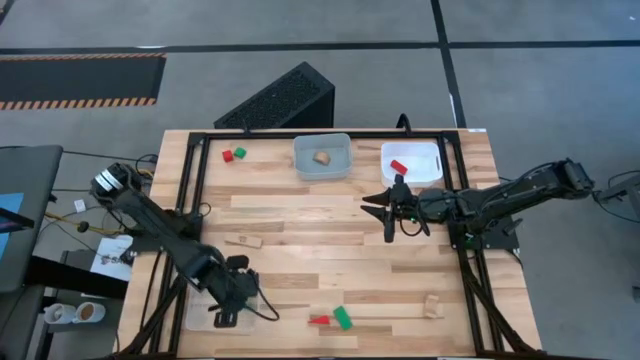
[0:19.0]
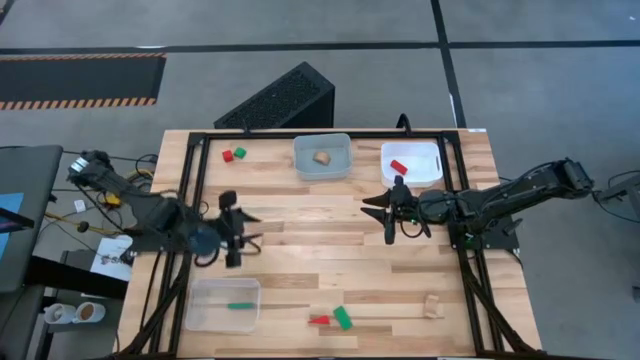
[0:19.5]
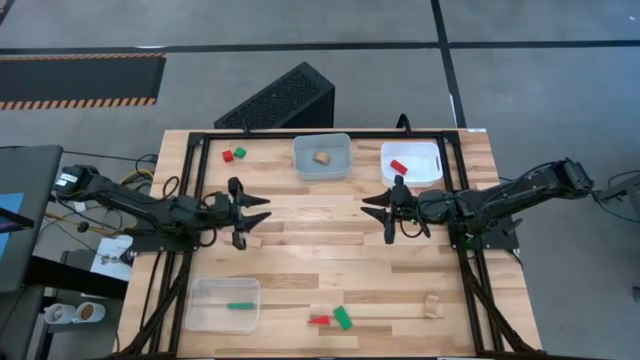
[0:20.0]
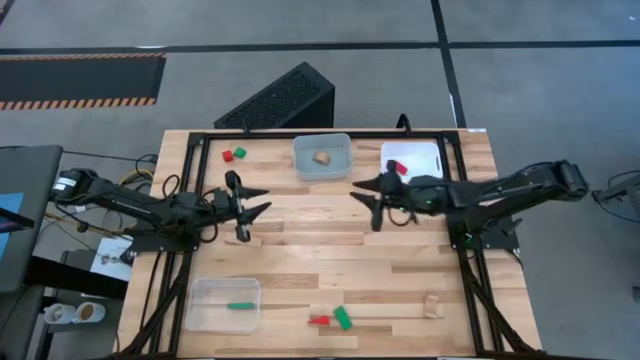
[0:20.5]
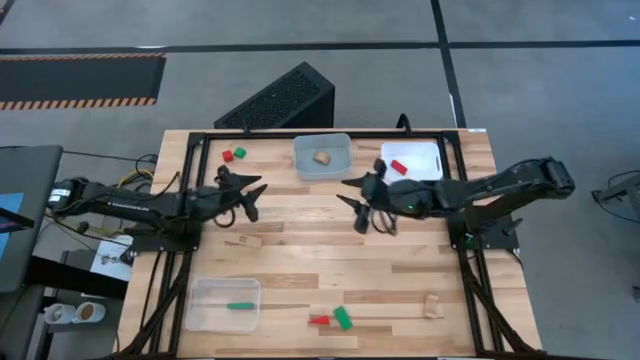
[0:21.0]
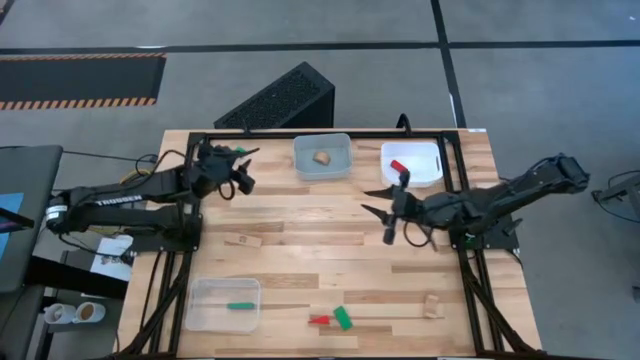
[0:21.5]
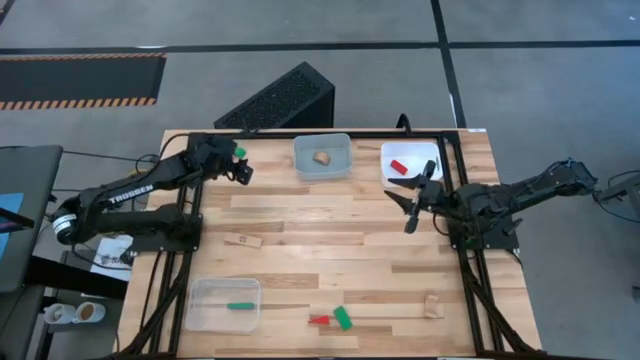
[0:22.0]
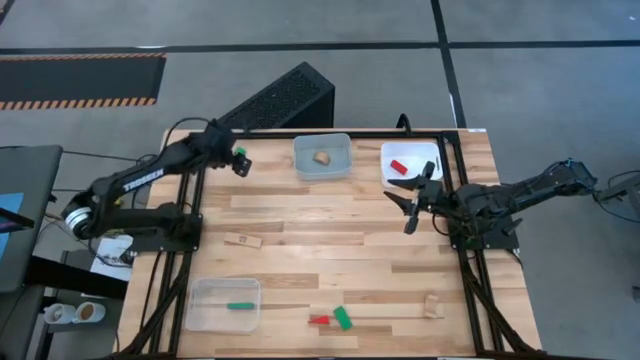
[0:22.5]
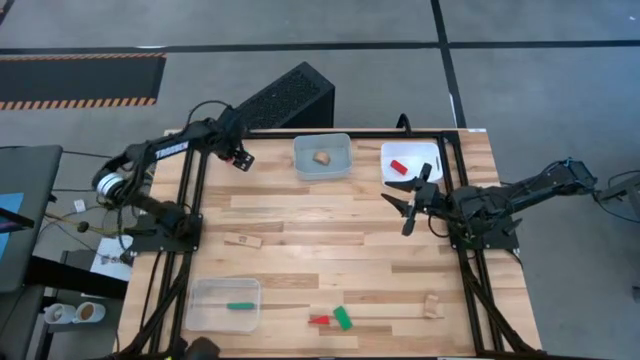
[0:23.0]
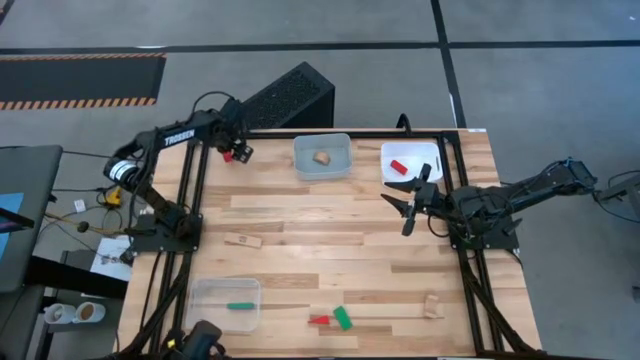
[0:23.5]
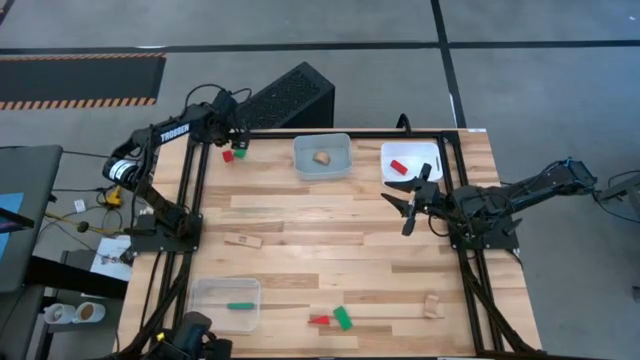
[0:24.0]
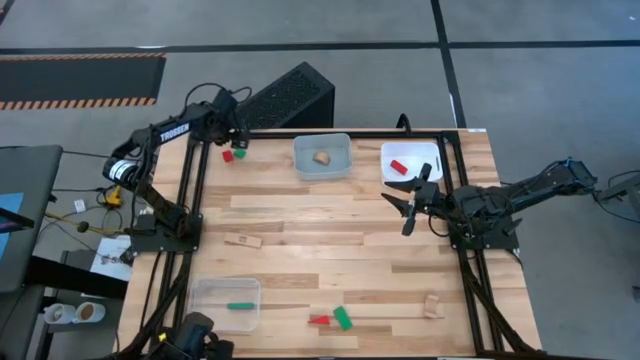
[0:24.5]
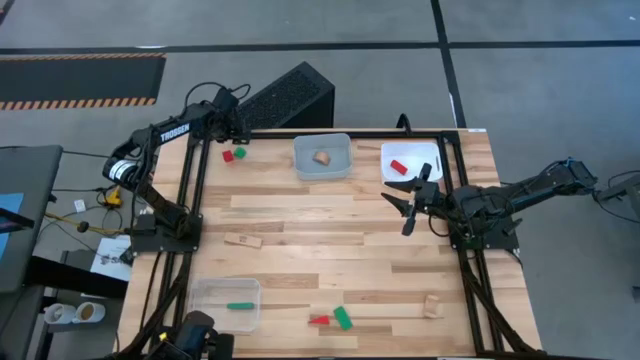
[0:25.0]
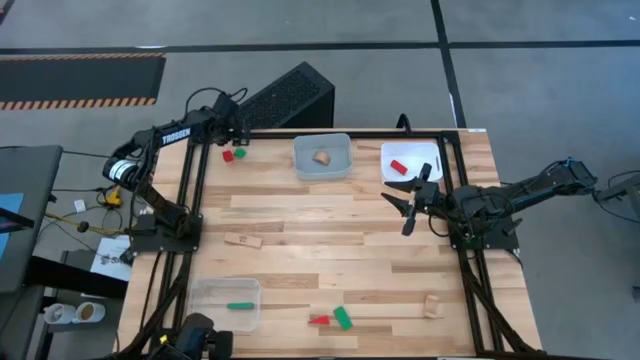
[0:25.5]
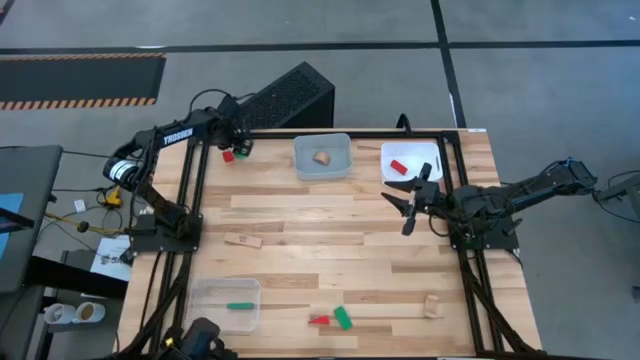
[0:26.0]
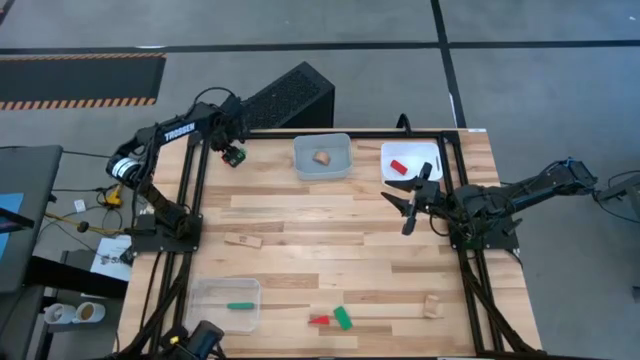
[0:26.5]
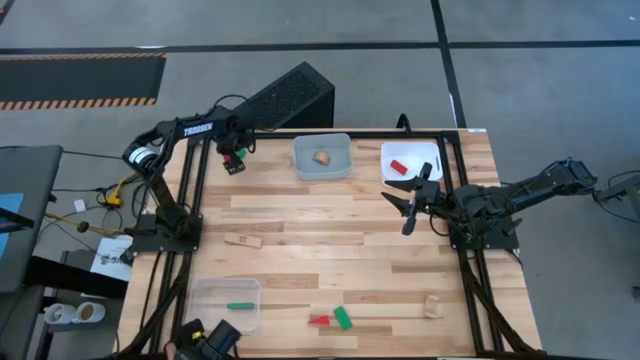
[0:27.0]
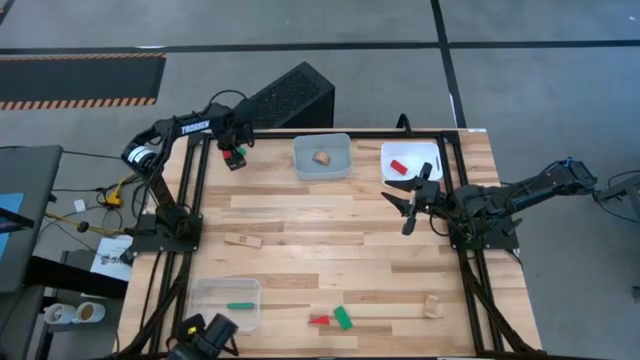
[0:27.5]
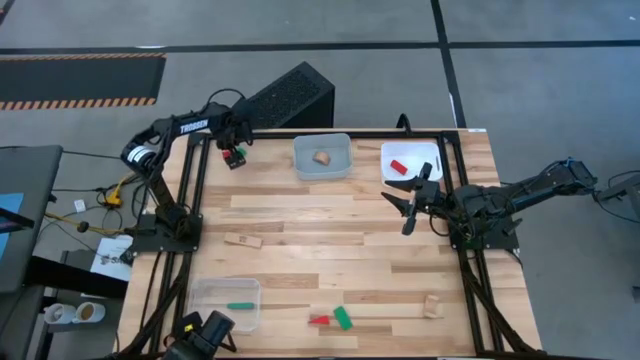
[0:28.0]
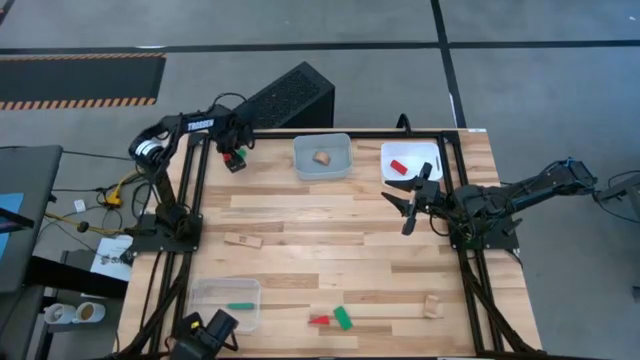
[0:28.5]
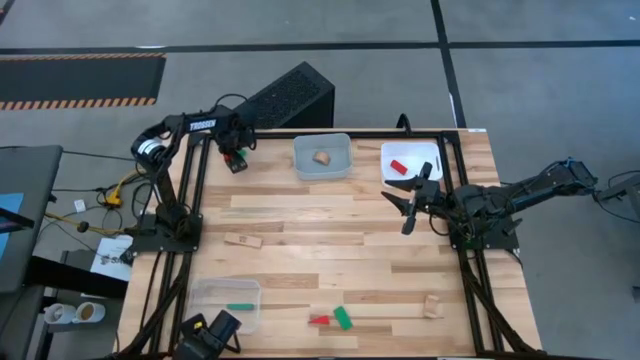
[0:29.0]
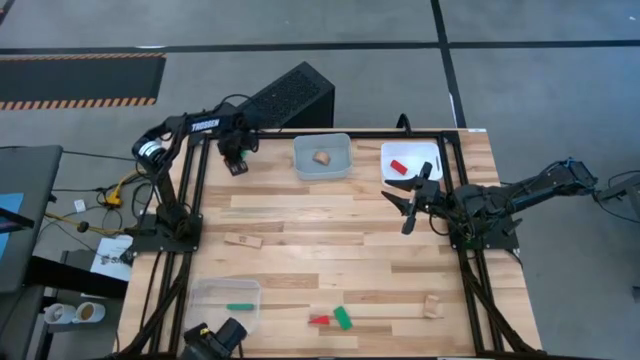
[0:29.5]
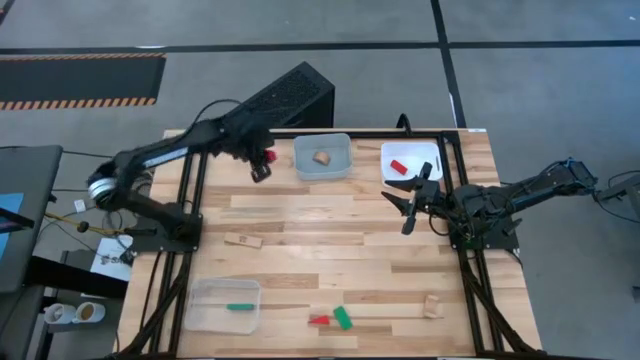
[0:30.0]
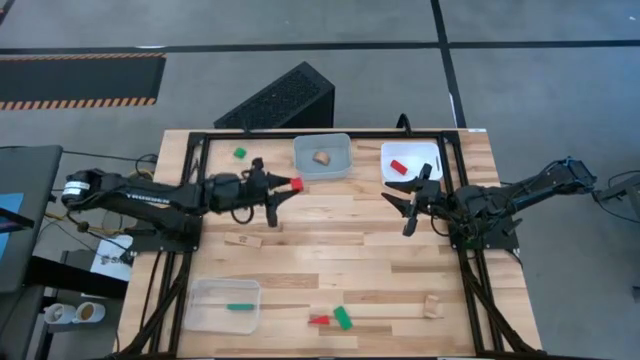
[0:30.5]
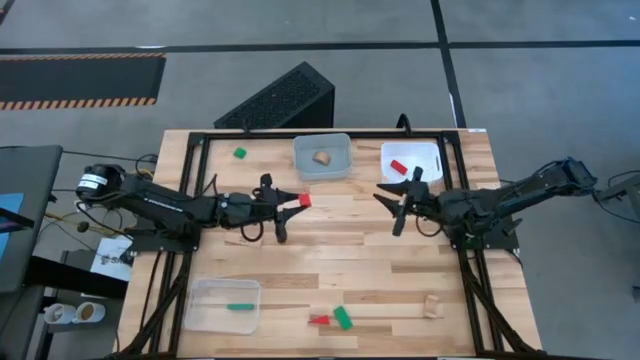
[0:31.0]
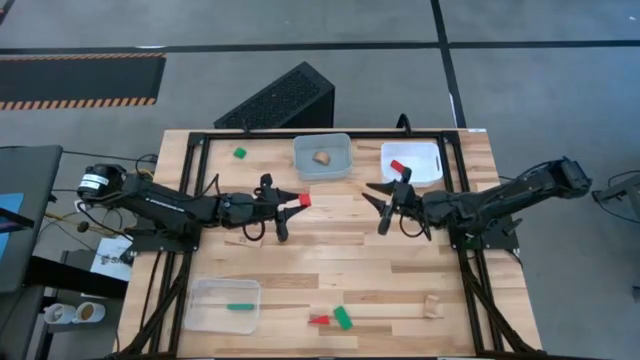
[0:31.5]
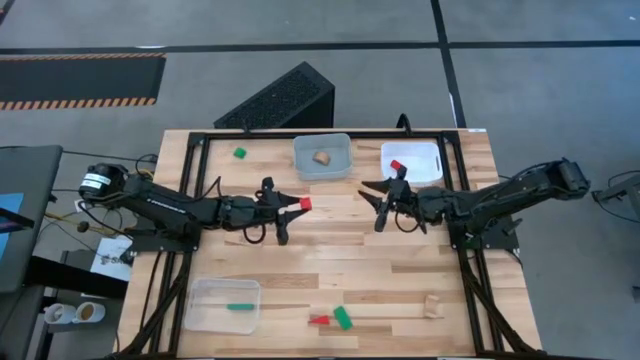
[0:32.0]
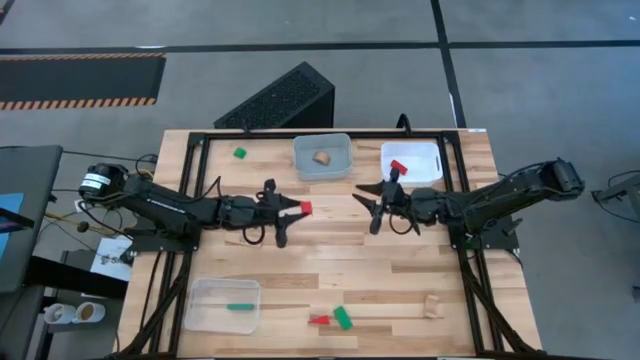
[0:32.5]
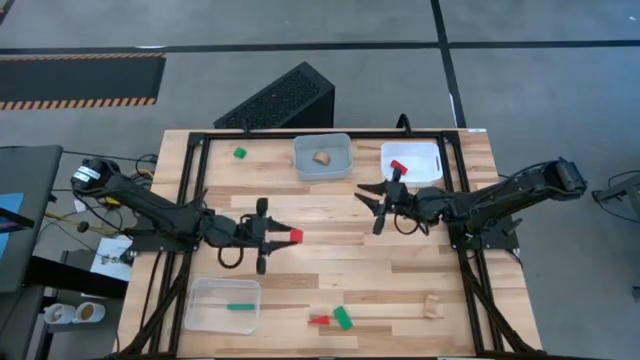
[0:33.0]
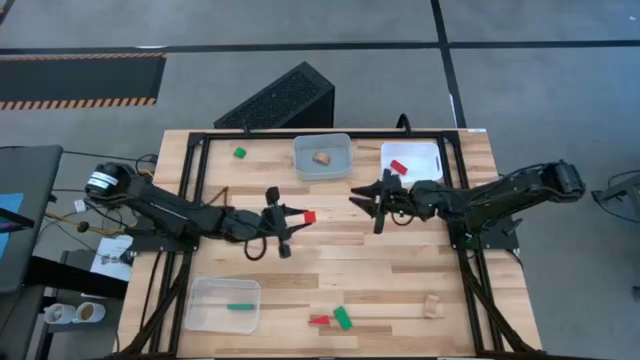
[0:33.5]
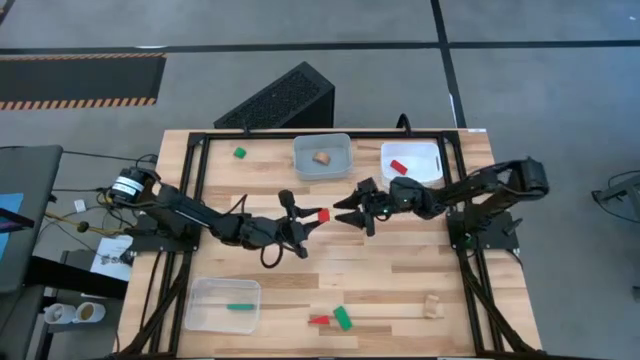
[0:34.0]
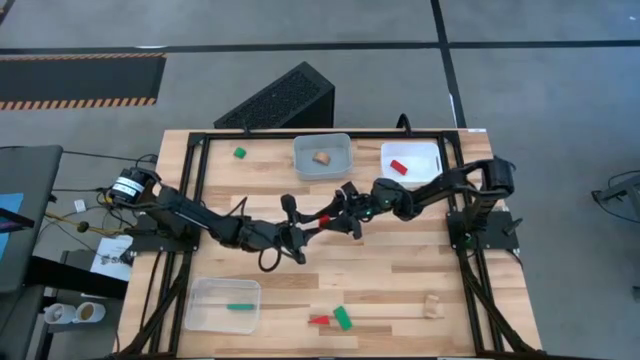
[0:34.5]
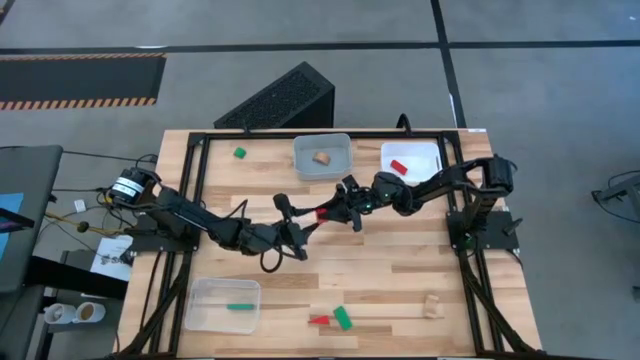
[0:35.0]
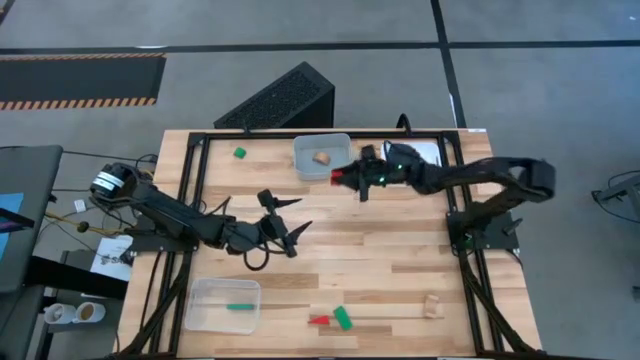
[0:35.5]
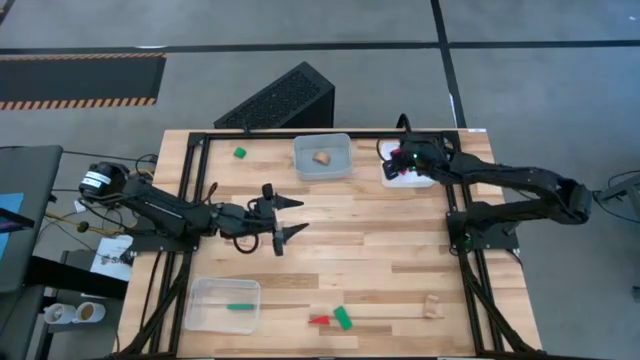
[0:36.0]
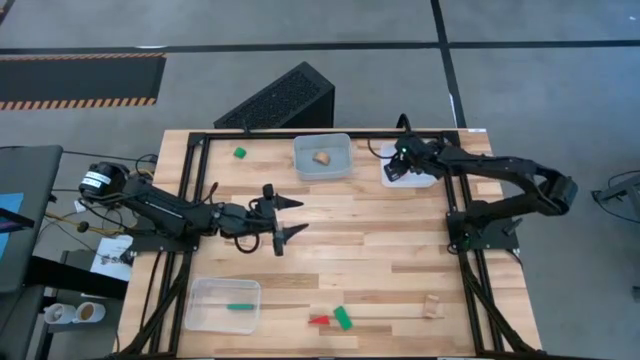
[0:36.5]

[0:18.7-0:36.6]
Task: Sort & place blocks by color
Put the top red block into the white bin

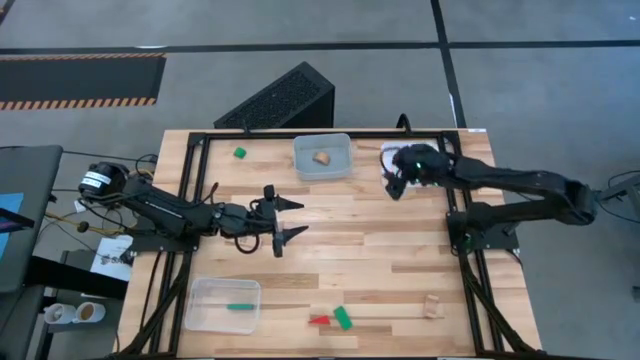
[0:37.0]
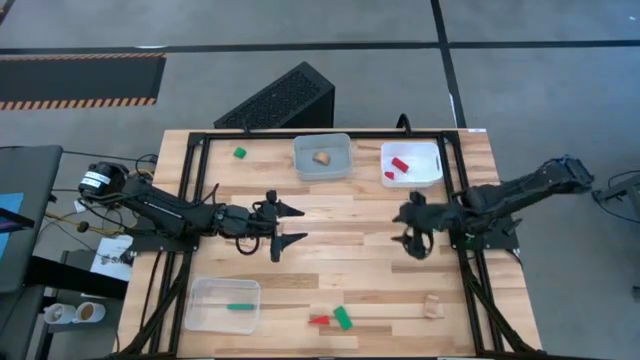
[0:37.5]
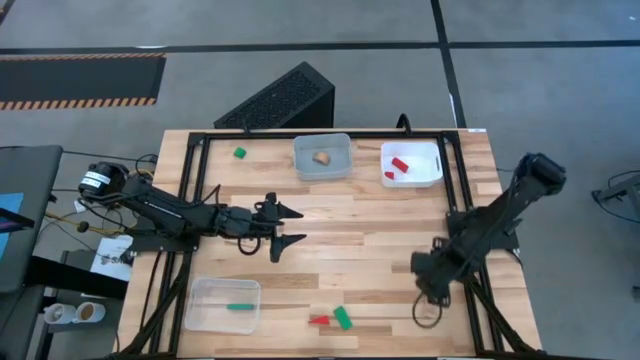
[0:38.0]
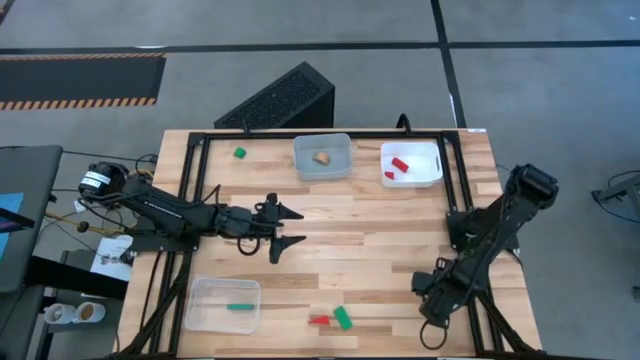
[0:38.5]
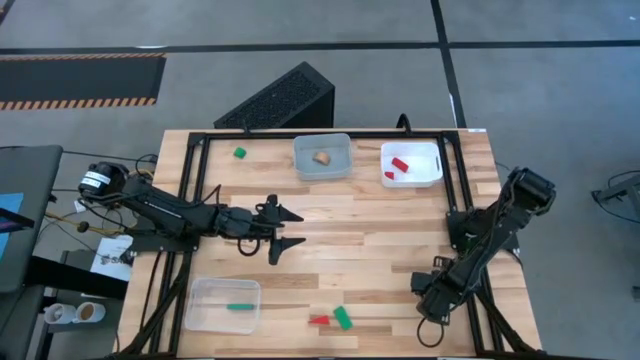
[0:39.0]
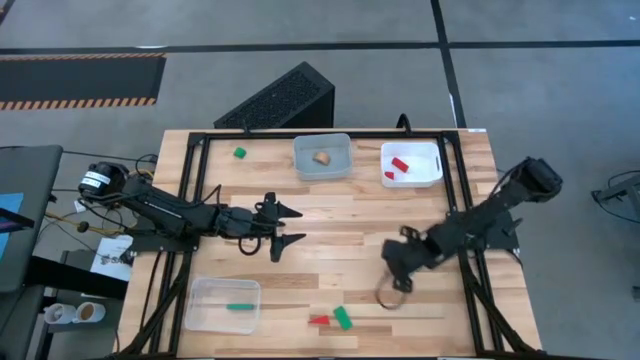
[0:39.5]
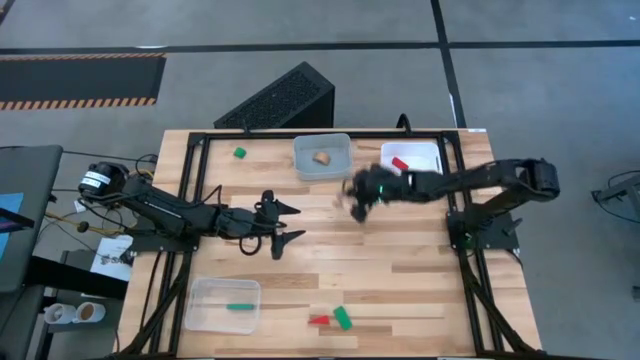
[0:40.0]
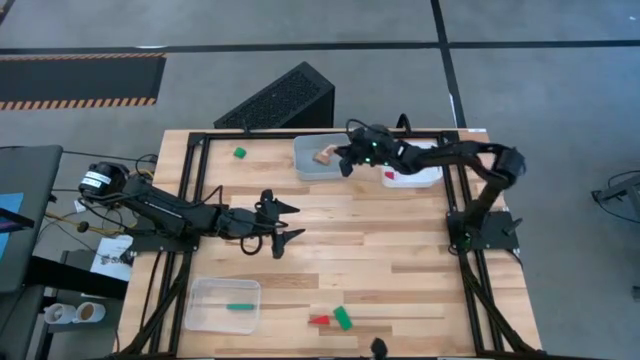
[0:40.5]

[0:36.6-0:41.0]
Put the bottom brown block into the gray bin
